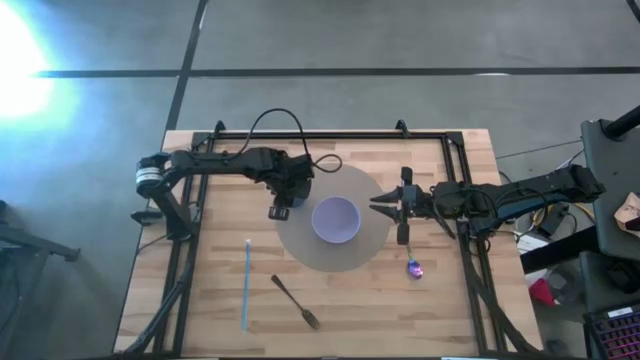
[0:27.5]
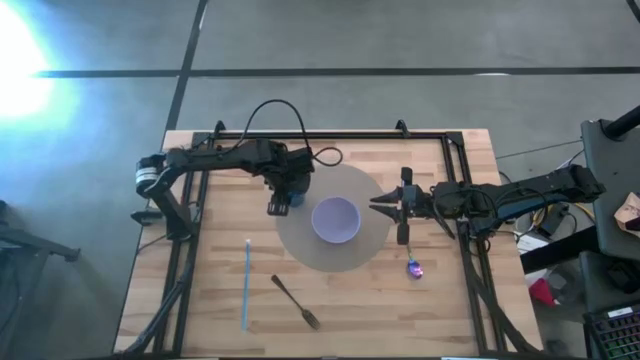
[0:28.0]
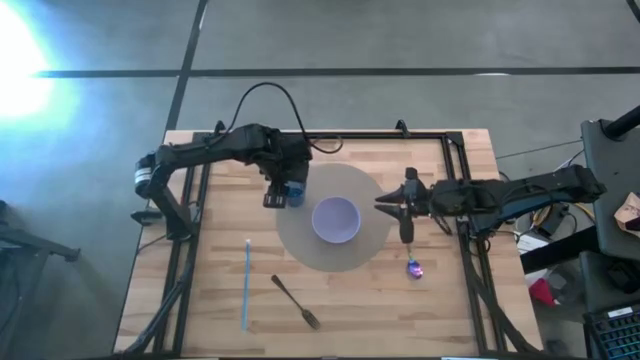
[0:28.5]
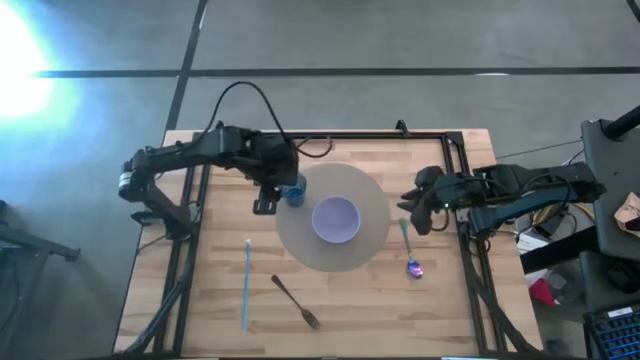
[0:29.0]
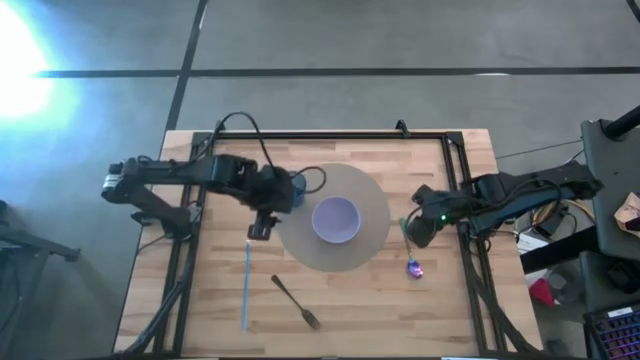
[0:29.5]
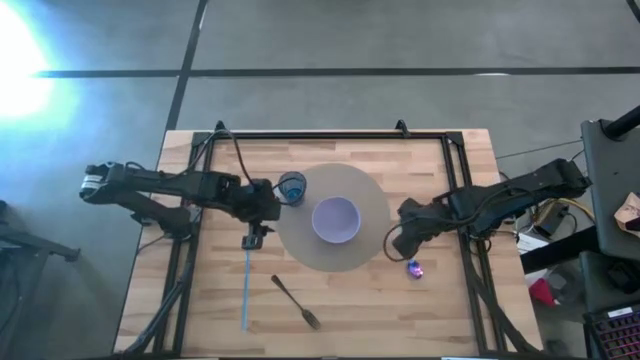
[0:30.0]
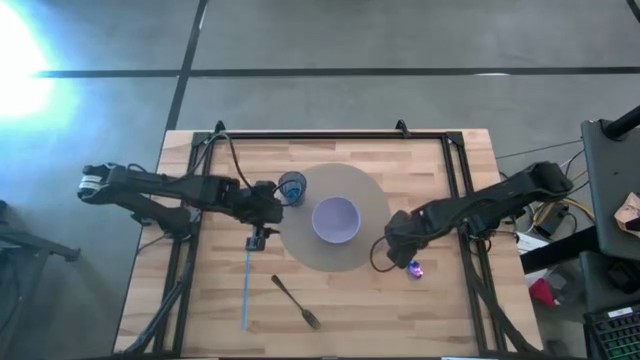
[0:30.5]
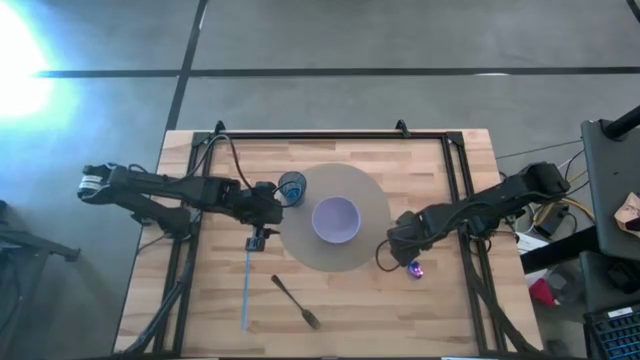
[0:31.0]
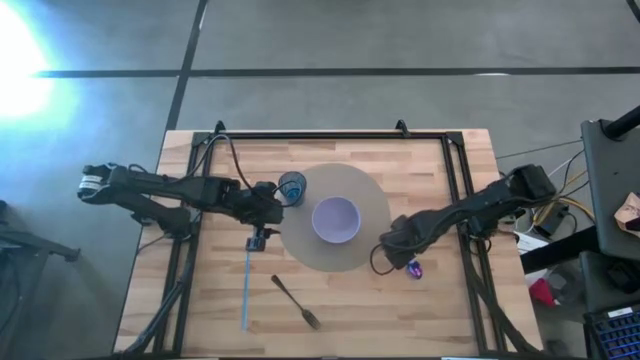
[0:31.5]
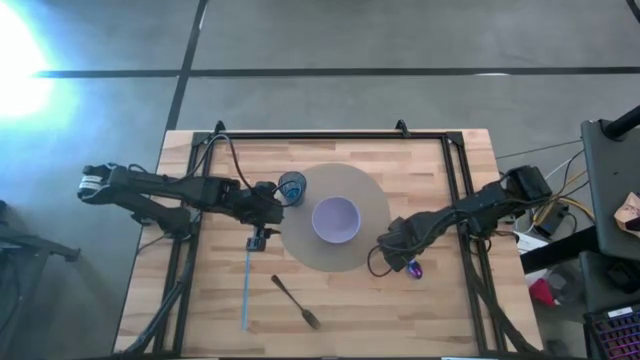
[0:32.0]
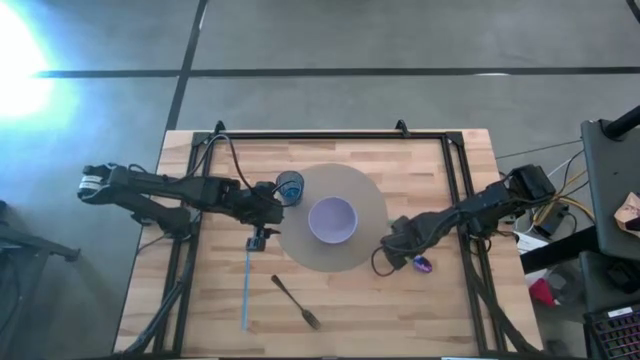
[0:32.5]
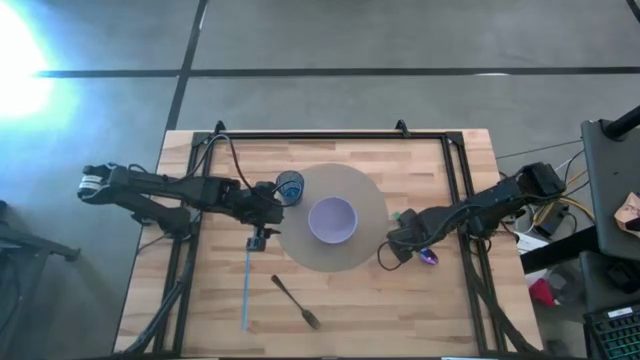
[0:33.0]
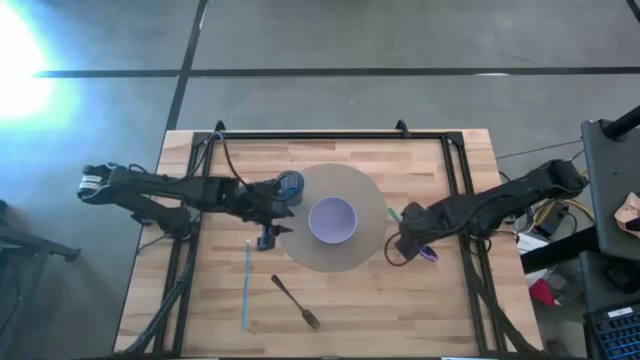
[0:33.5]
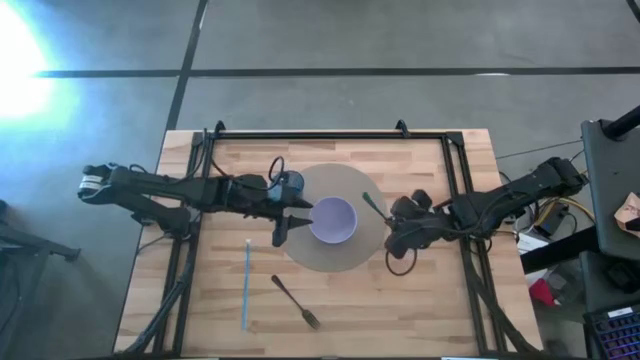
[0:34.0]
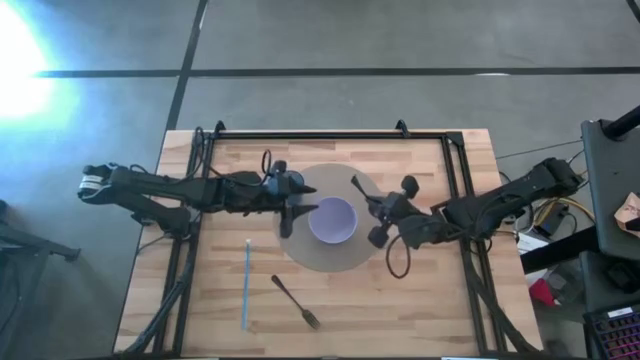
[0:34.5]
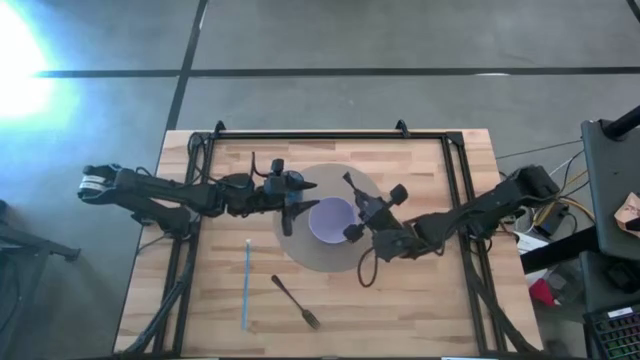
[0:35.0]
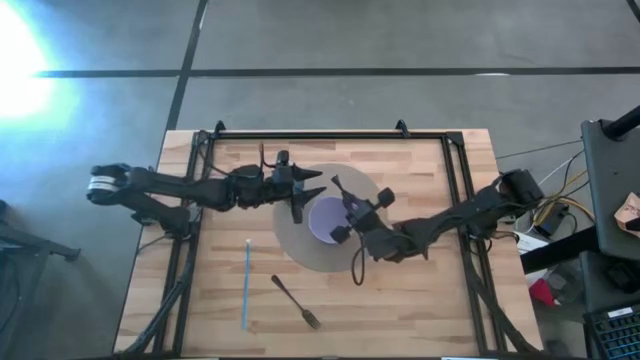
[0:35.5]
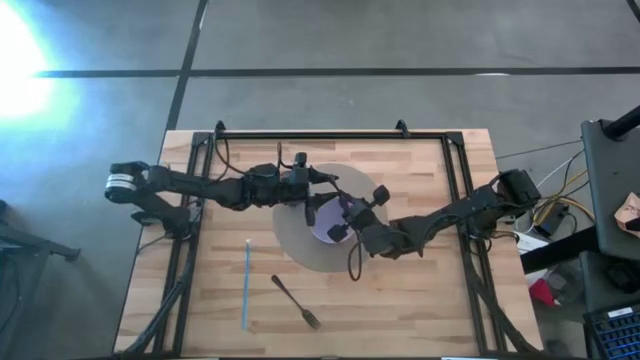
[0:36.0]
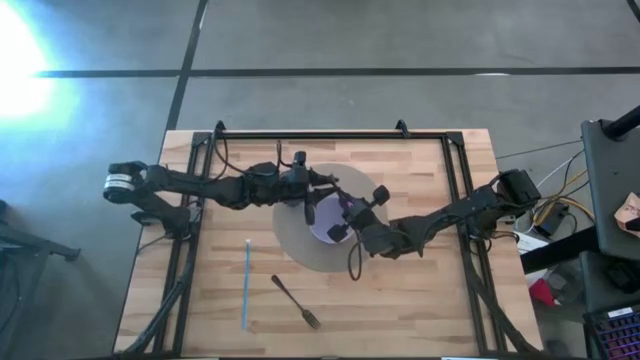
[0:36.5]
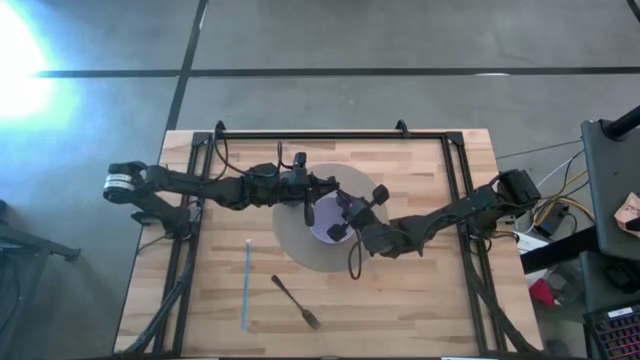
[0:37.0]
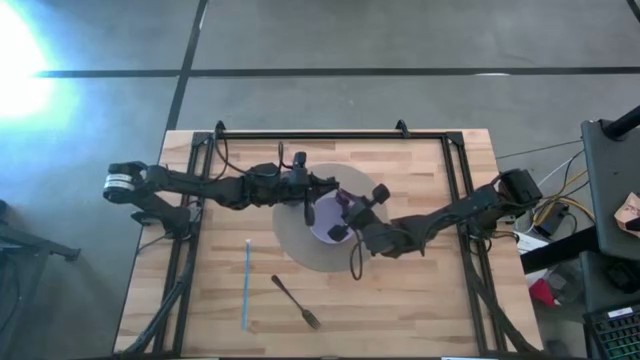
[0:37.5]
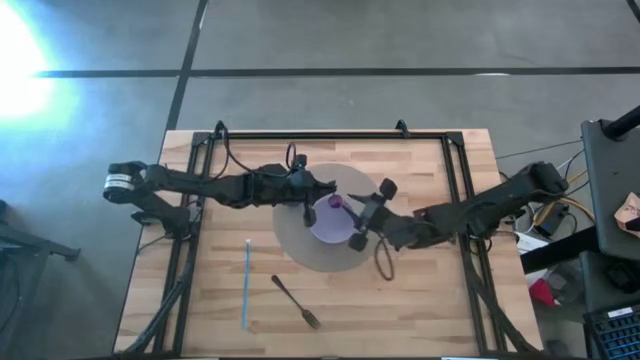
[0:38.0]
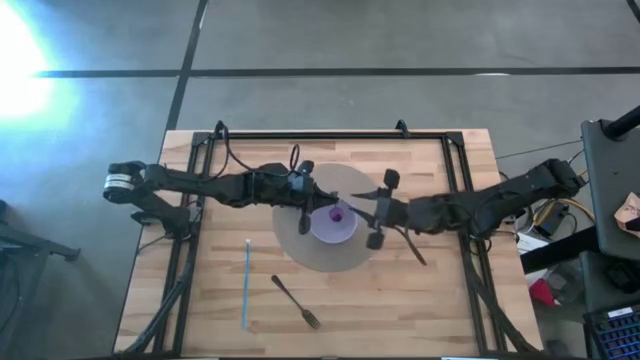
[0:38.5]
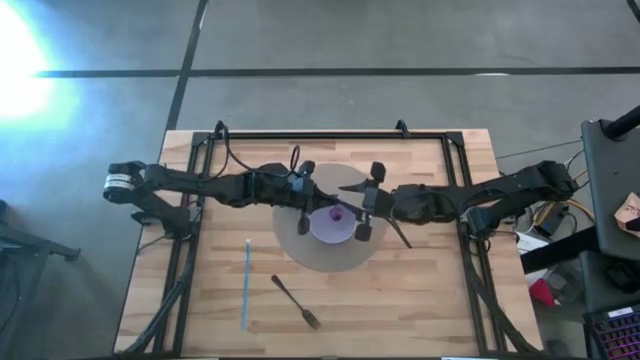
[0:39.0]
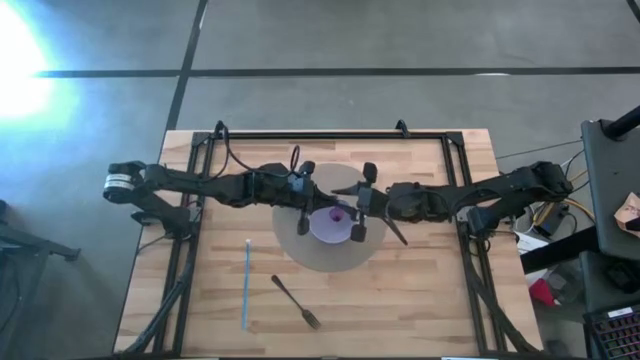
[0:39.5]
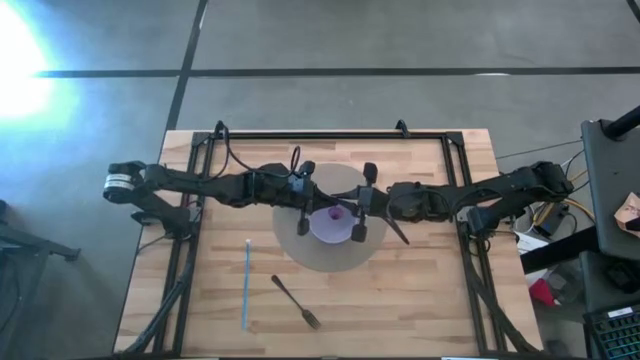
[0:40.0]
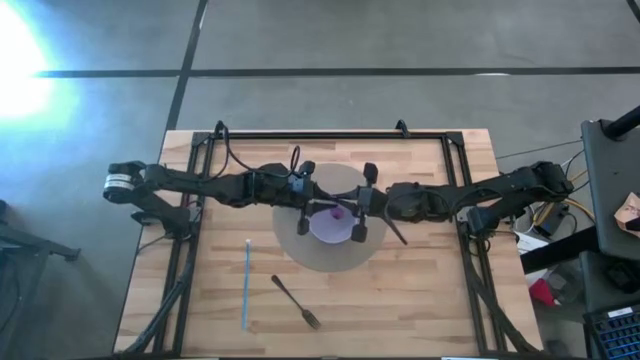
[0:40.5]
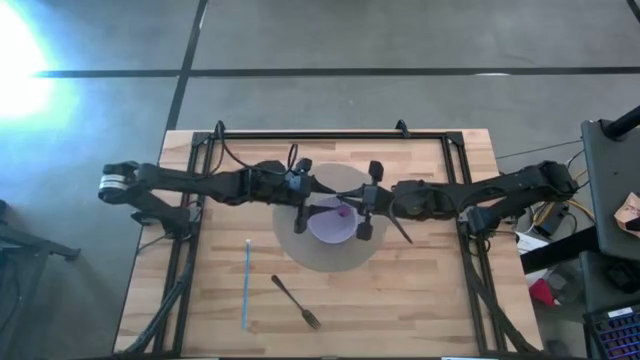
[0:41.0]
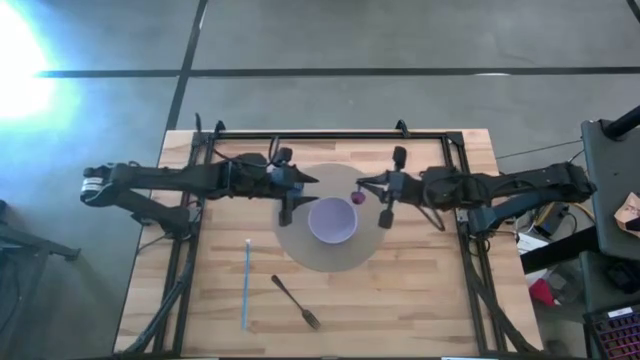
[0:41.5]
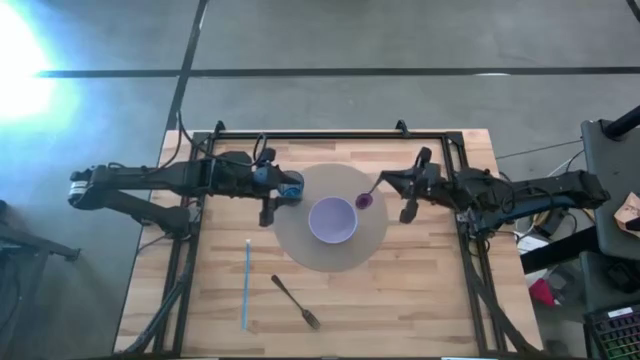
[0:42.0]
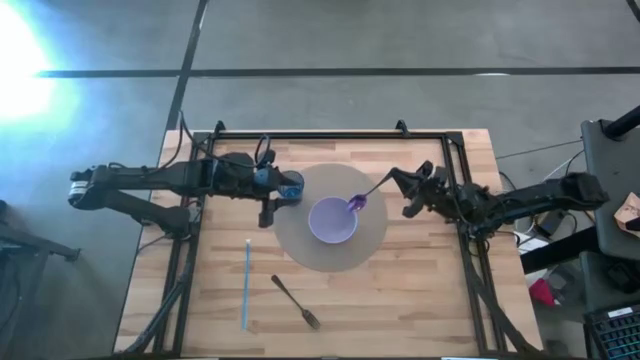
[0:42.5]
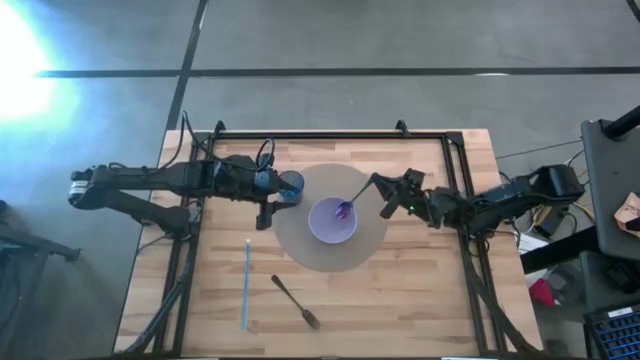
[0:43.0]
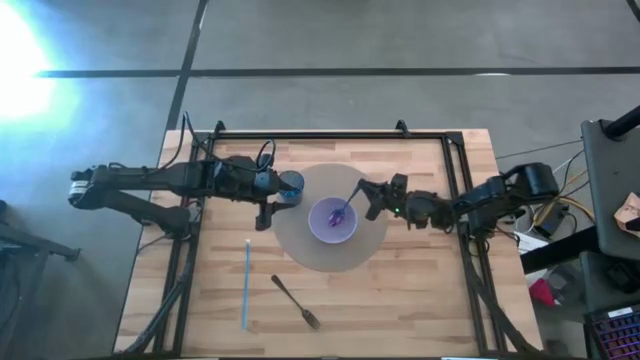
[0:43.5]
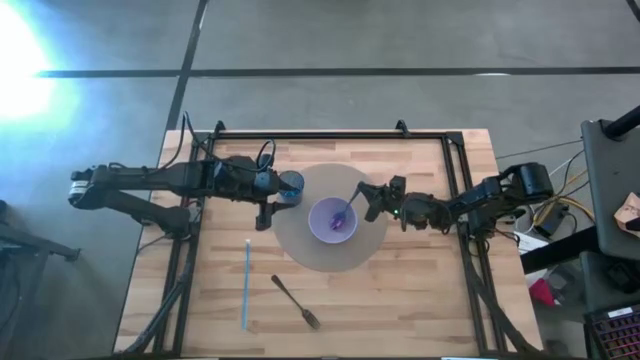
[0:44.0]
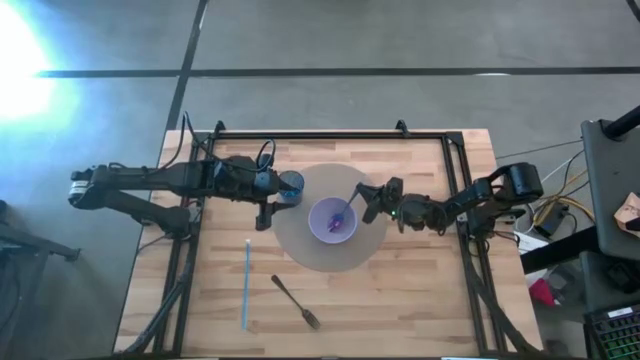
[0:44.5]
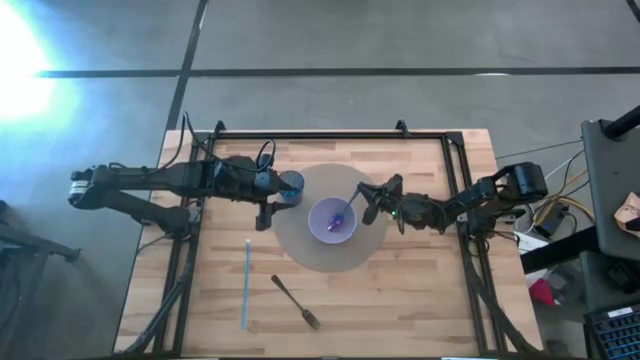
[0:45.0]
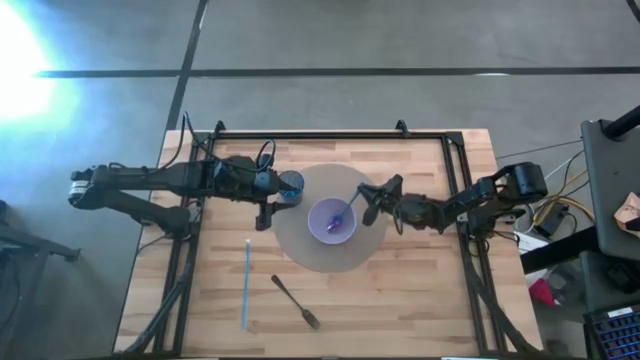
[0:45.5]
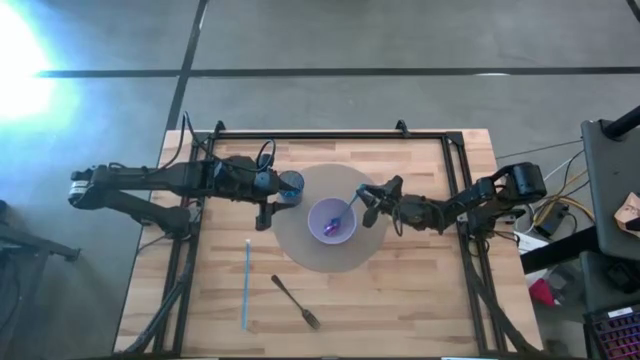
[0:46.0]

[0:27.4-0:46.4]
Task: Pick & Place Utensil
Put the purple spoon into the purple bowl

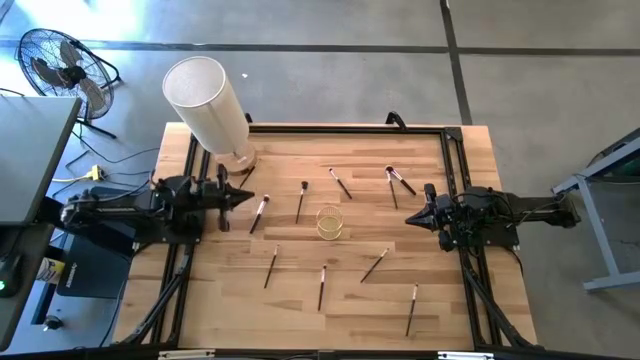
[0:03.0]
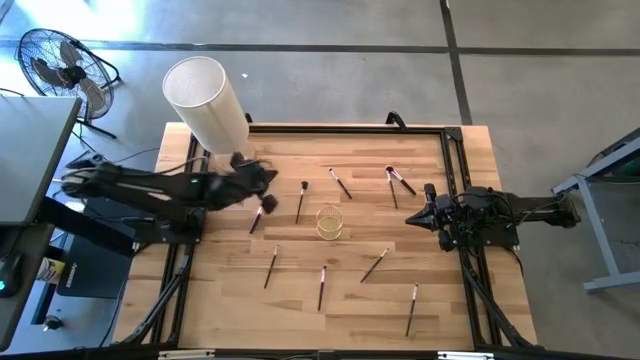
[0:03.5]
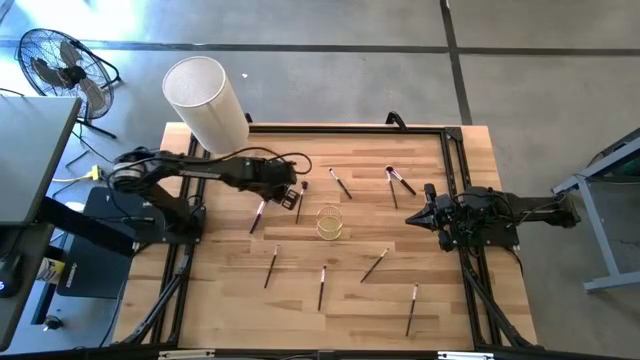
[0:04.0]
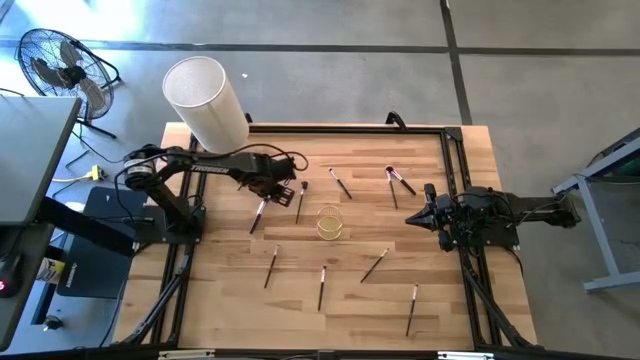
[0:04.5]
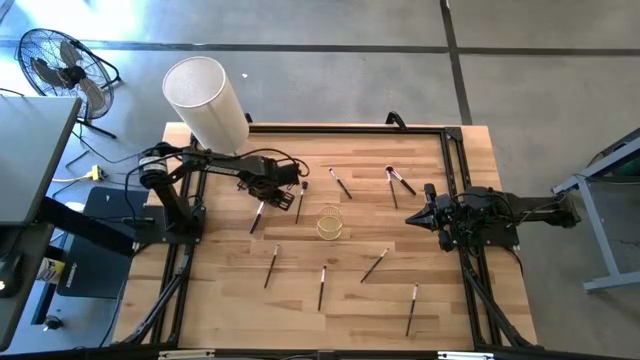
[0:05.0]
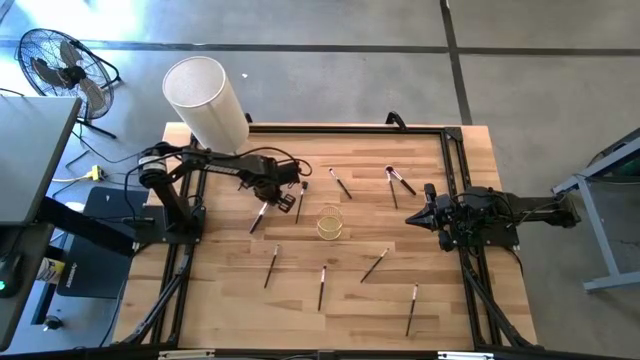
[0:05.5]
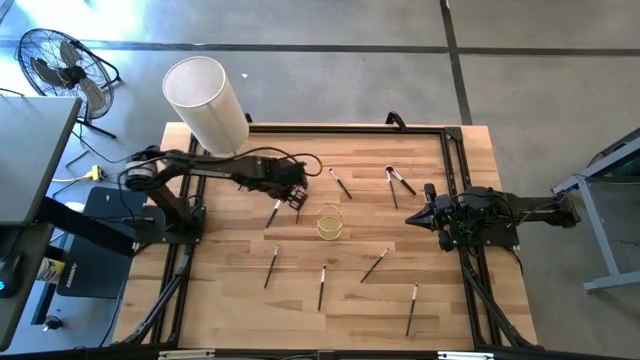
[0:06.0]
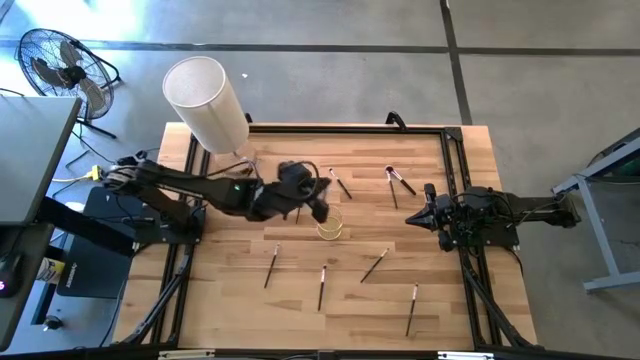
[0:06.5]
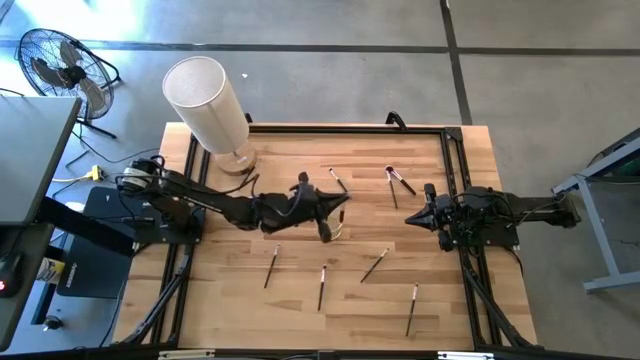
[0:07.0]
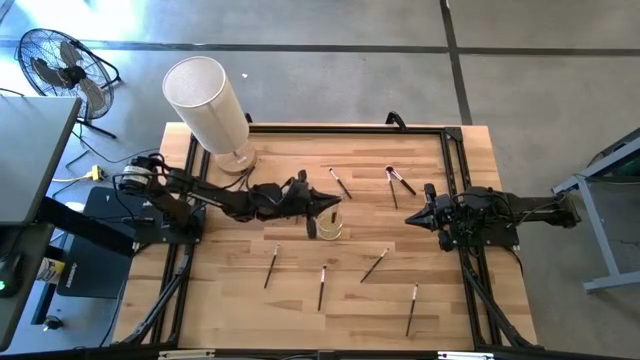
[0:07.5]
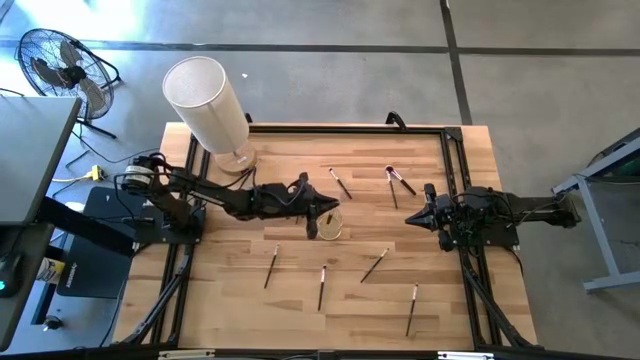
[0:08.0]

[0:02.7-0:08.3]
Task: Put items in baskets/containers
Put the left powder brush into the wire organizer
